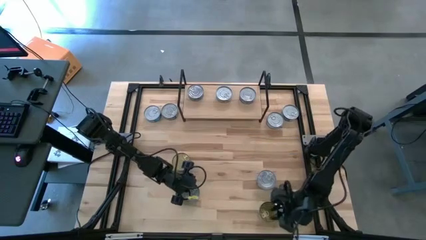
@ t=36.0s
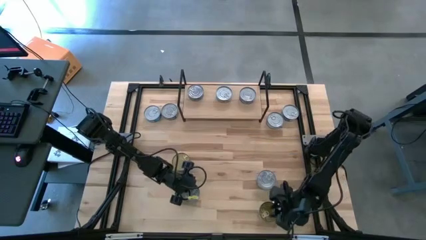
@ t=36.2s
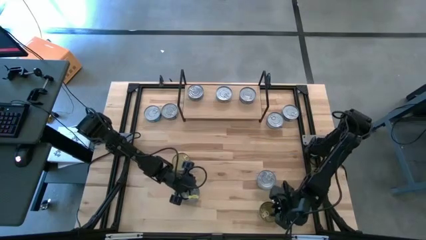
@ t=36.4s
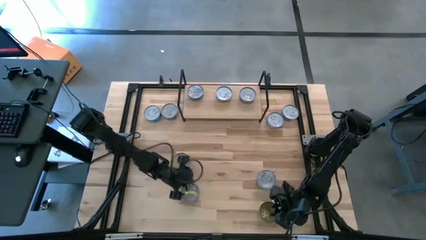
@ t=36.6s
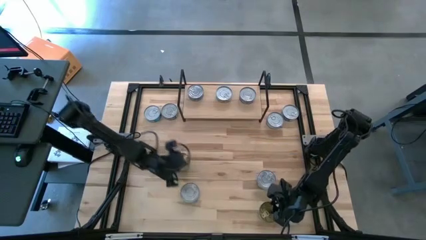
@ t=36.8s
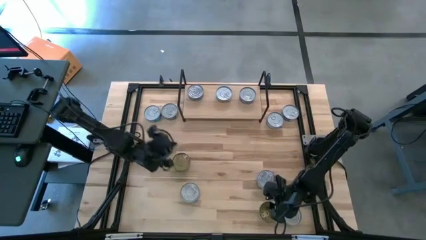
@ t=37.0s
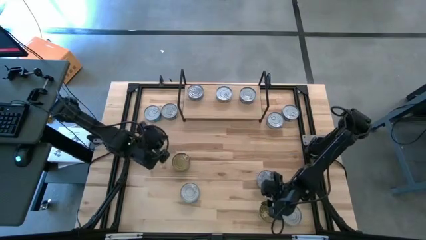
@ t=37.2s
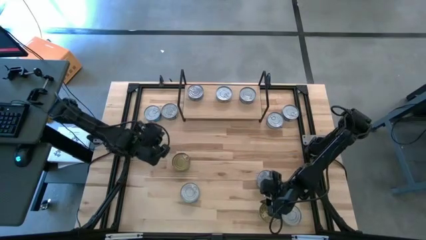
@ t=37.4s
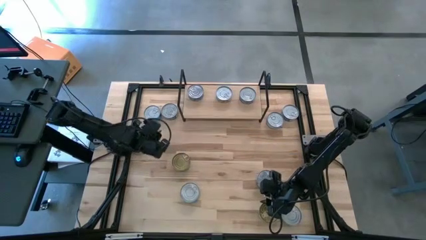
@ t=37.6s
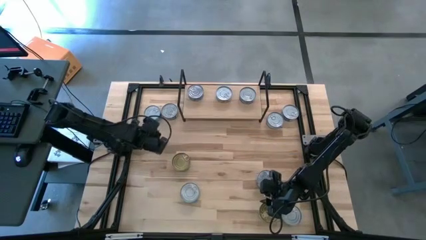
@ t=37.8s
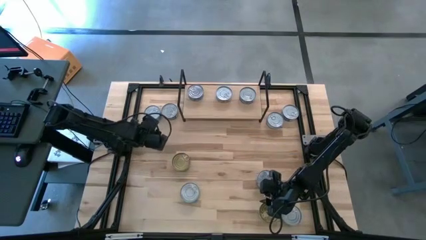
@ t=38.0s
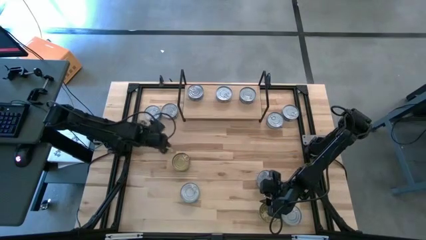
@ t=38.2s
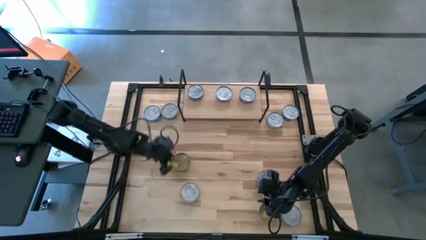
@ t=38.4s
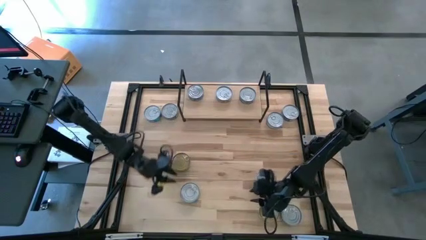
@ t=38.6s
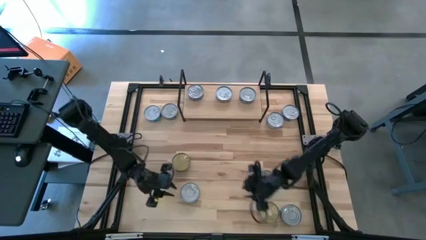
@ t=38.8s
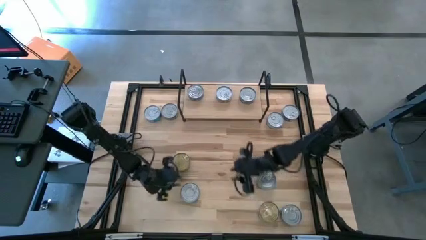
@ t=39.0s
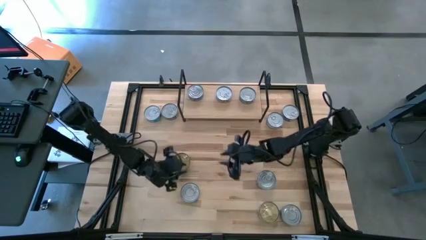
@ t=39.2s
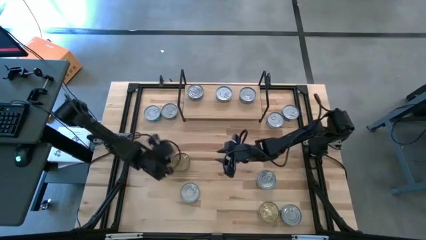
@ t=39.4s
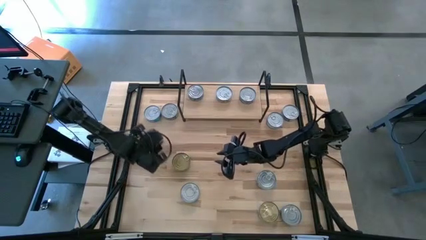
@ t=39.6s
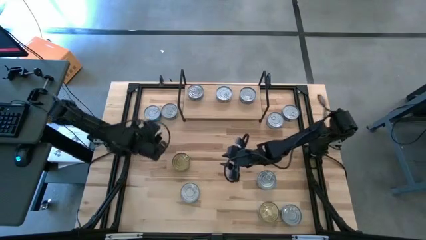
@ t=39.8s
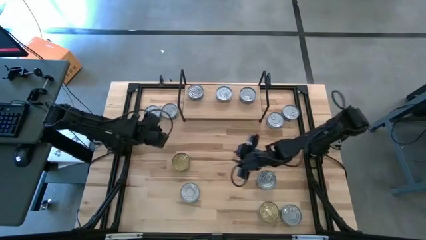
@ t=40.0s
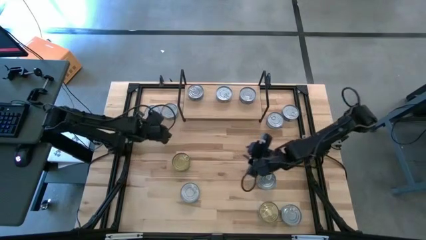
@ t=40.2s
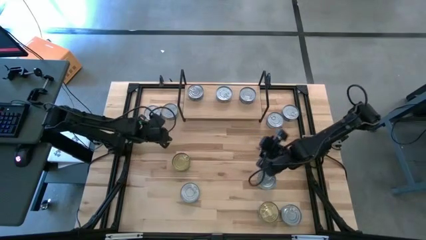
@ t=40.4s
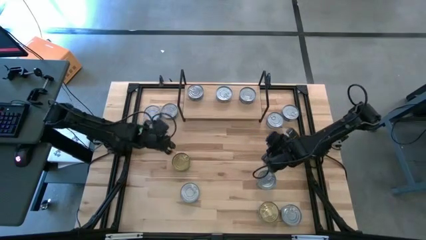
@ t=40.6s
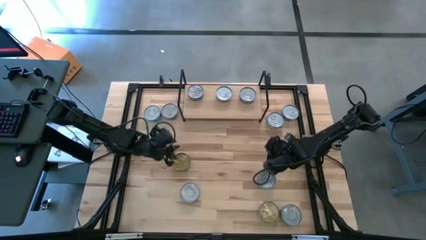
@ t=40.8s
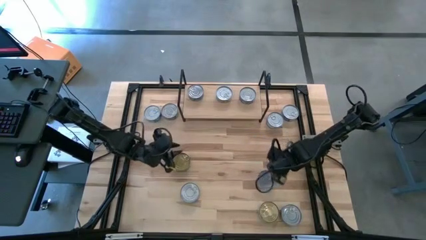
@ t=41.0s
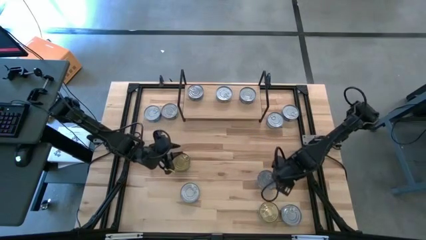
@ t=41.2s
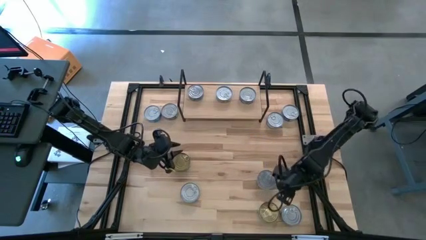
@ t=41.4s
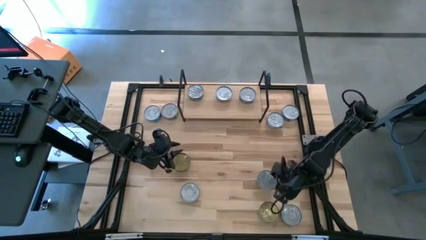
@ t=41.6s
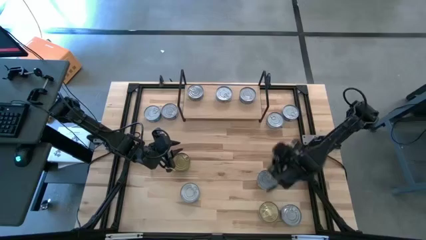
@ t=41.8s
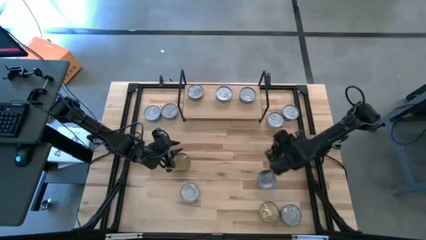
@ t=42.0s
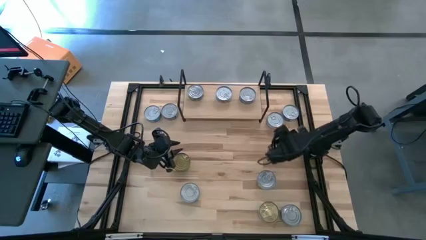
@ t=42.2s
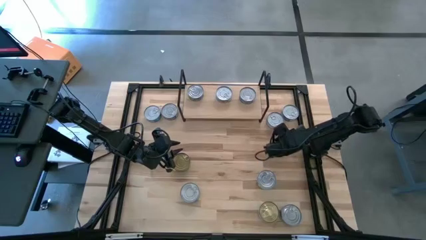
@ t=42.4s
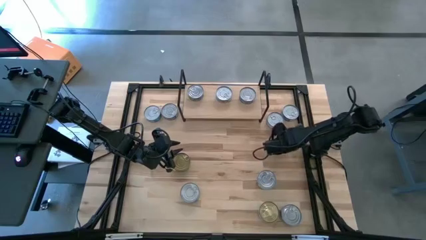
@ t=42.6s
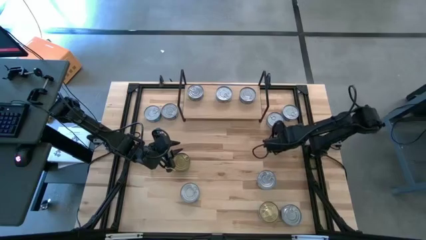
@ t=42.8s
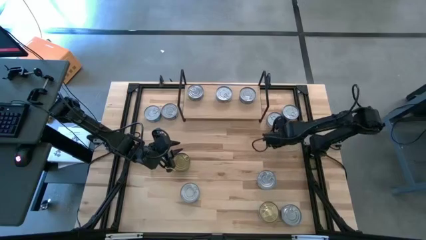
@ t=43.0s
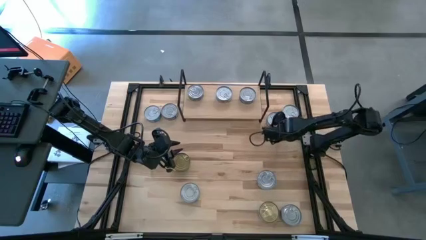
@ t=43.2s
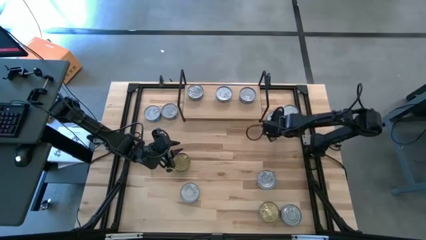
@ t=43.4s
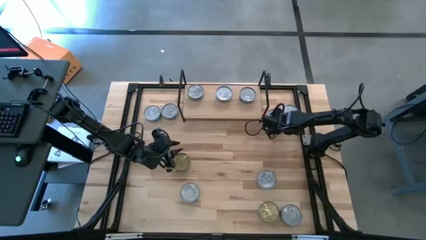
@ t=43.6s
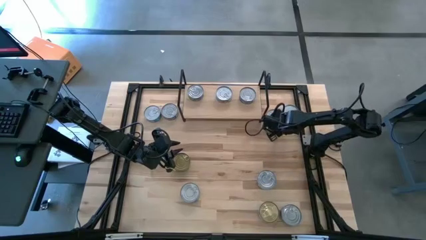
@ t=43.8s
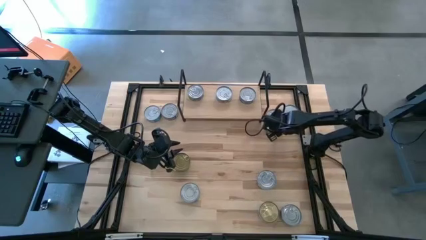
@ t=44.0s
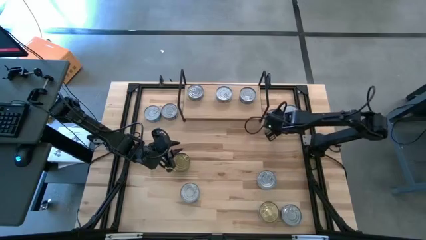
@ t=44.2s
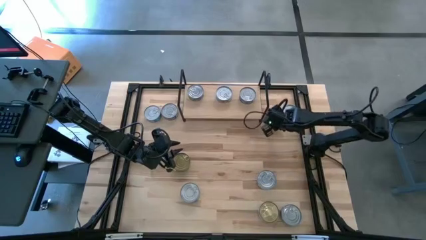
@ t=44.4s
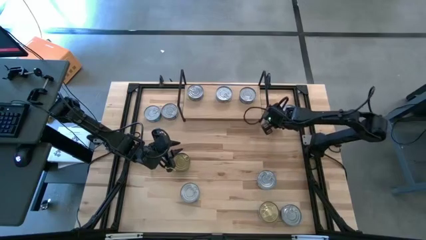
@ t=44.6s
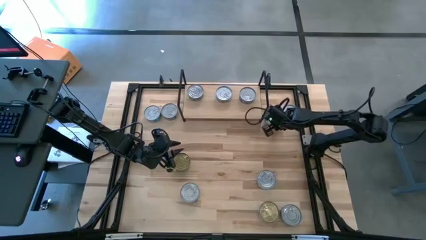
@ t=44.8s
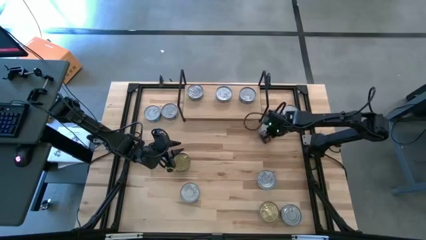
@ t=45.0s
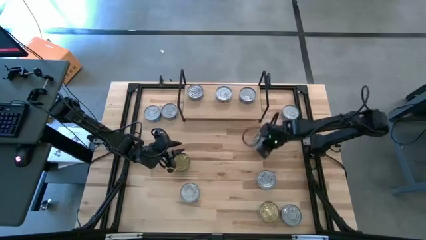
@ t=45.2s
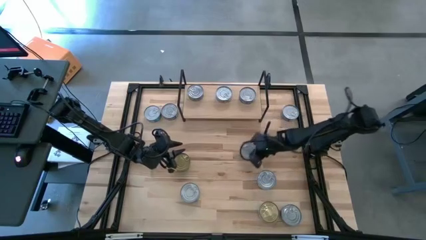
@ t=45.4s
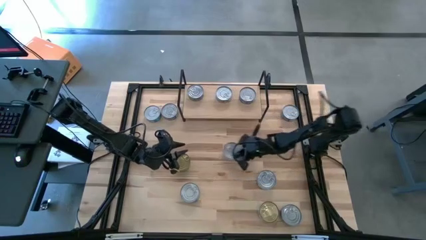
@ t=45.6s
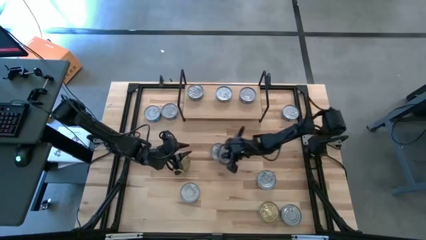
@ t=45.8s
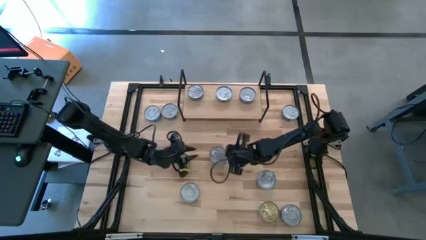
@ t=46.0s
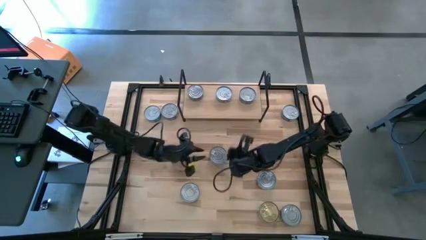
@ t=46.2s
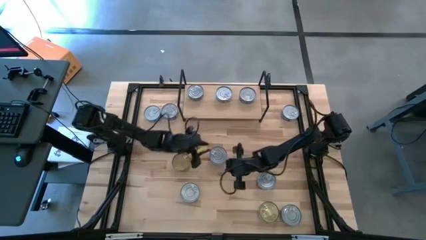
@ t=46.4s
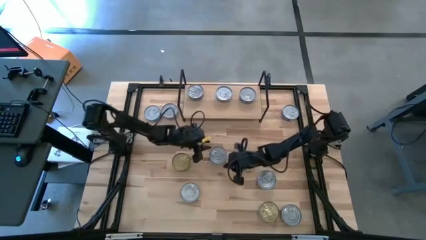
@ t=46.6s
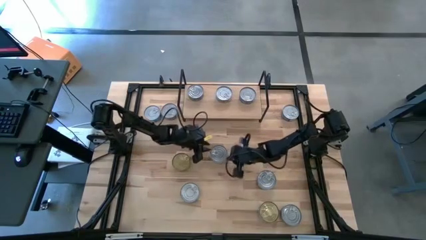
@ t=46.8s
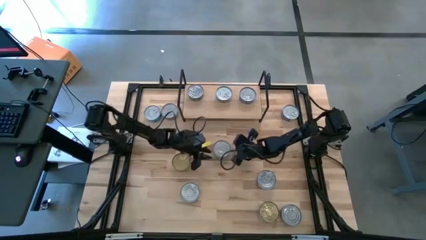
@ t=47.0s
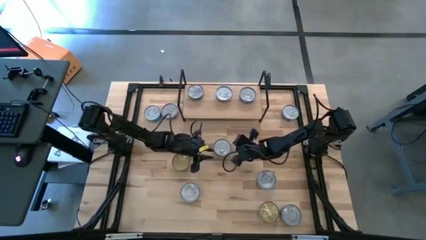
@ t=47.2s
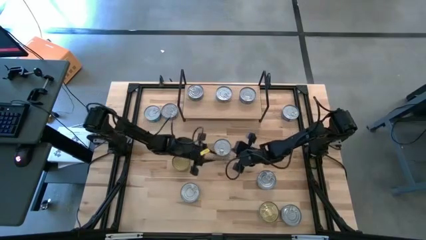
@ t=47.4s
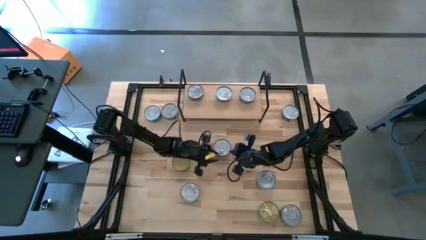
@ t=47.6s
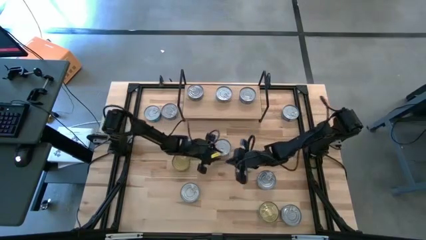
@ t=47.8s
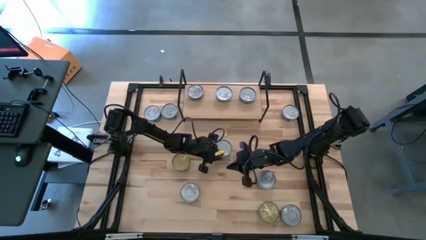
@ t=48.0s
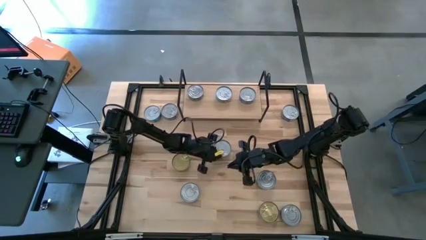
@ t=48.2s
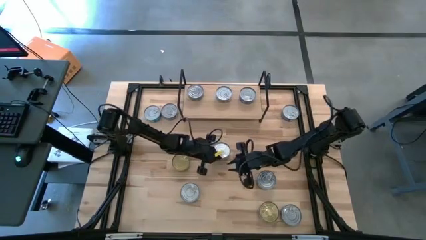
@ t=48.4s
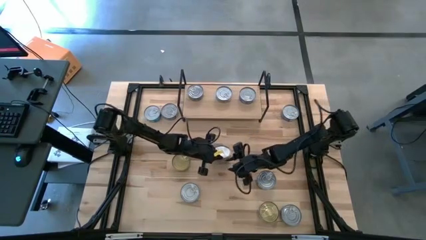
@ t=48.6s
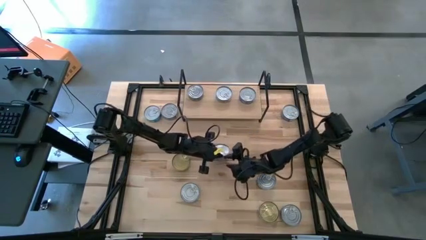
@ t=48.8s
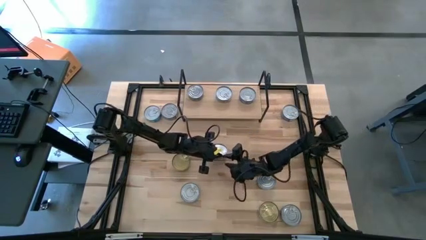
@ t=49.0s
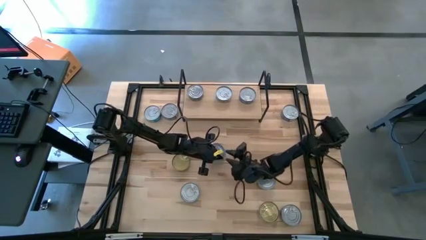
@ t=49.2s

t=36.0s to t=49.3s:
Task: Stack canned seafood by type on shelf
Put the yellow and blue tuna can on the shelf
